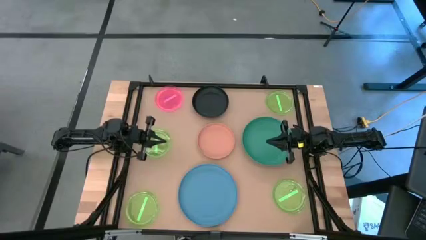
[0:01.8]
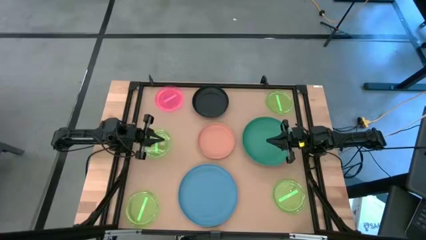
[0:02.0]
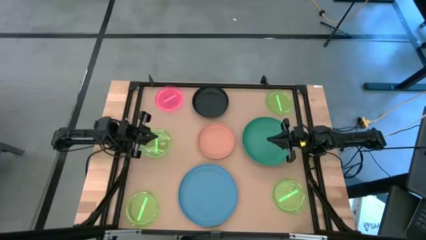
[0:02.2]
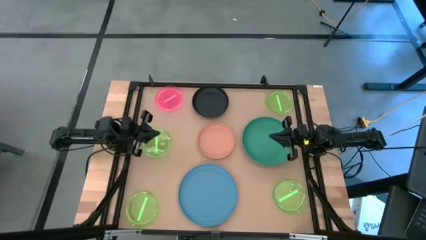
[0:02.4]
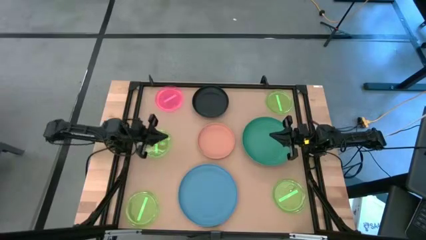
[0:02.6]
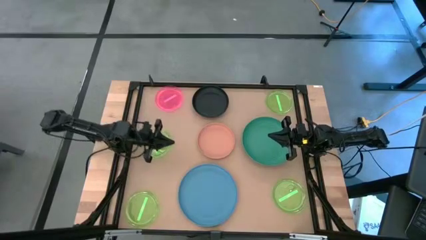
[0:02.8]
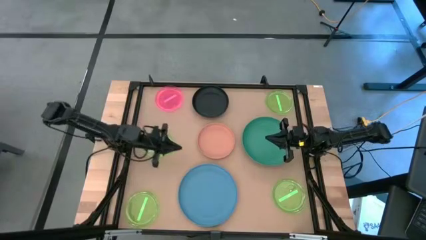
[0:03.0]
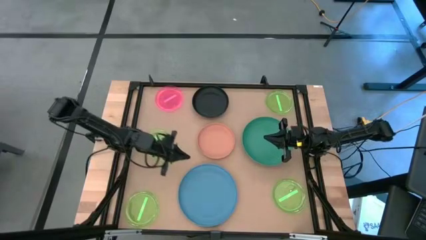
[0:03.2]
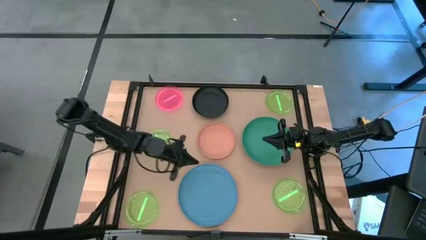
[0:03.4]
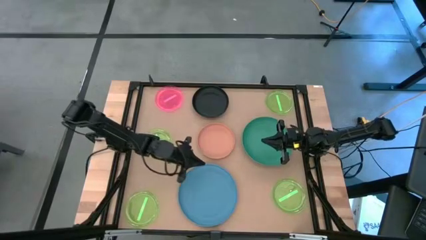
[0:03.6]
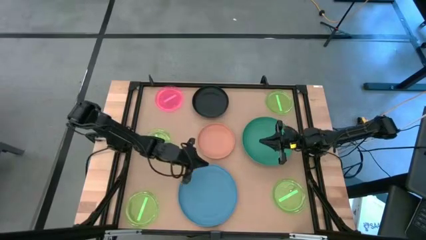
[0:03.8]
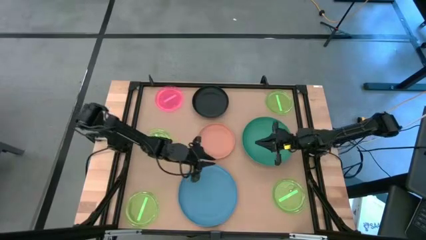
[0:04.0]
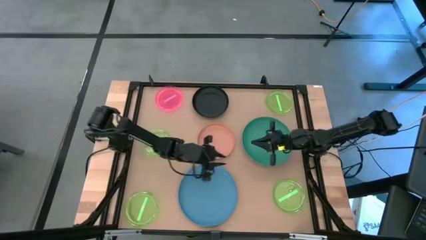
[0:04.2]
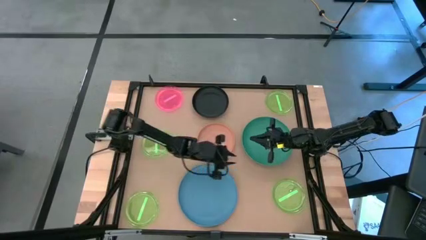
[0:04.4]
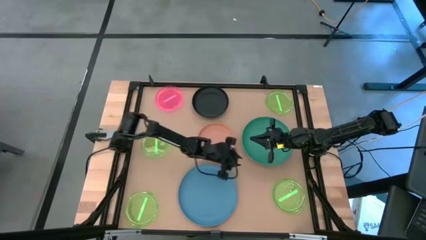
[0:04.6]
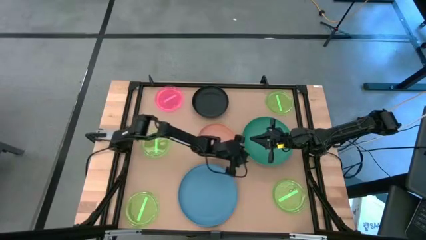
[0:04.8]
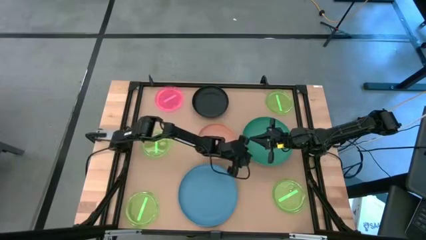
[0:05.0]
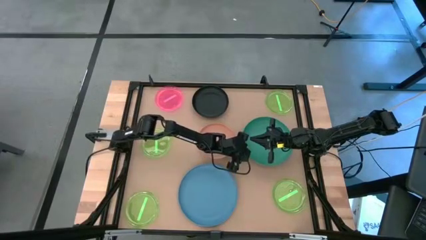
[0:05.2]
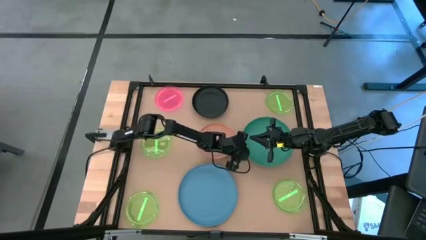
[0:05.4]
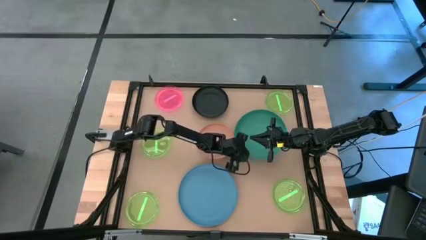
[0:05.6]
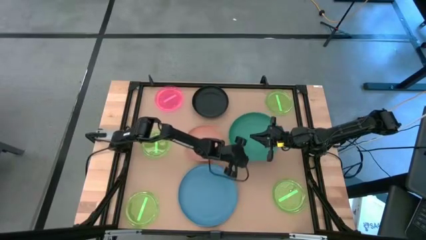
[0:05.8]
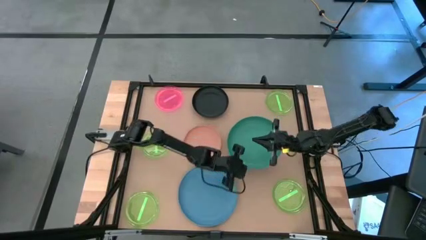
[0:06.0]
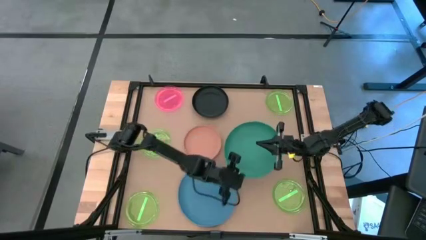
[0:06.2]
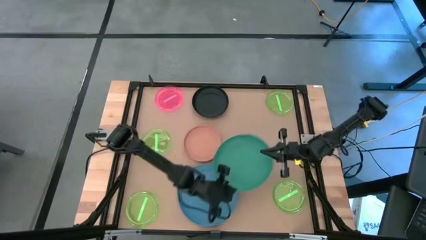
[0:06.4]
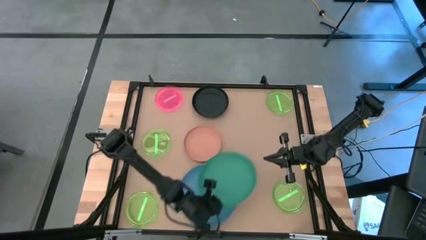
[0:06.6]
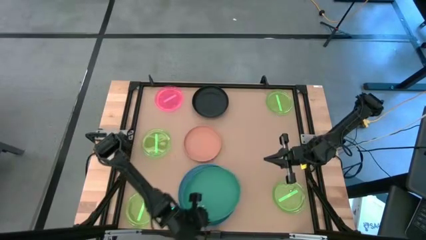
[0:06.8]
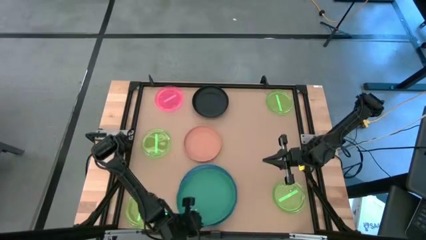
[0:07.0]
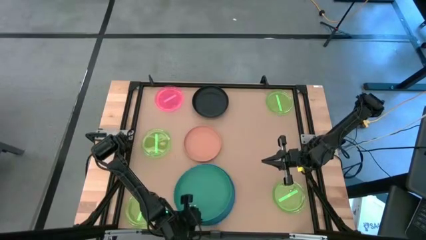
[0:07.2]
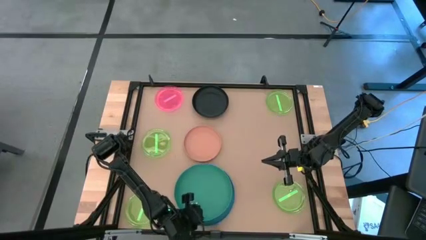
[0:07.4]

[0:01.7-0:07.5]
Task: Stack plastic plates
Stack the dark green plate on top of the blue plate

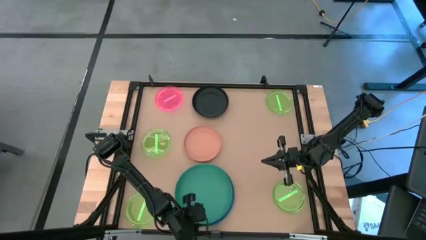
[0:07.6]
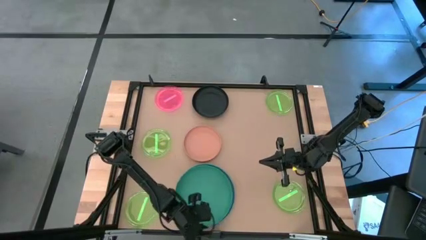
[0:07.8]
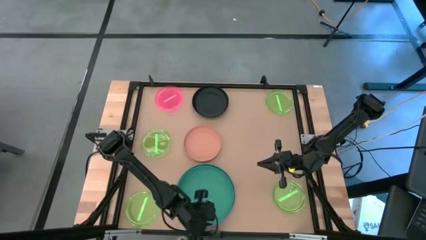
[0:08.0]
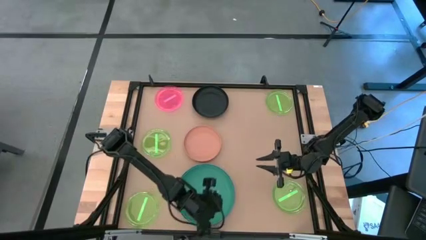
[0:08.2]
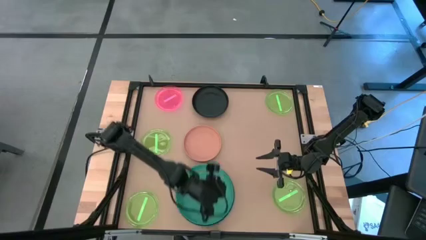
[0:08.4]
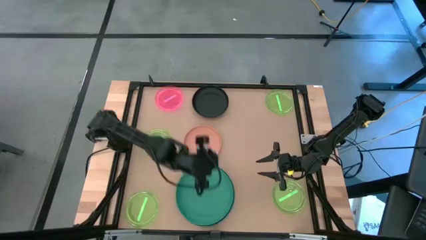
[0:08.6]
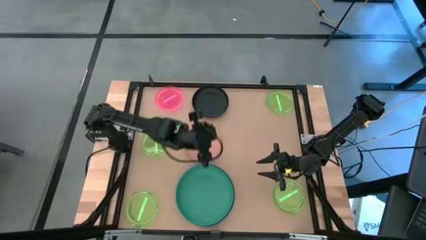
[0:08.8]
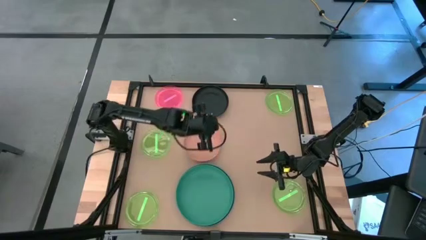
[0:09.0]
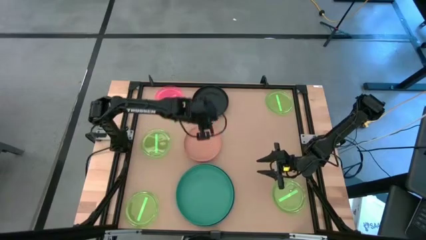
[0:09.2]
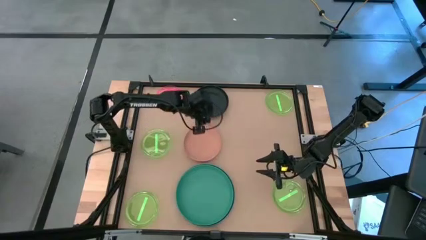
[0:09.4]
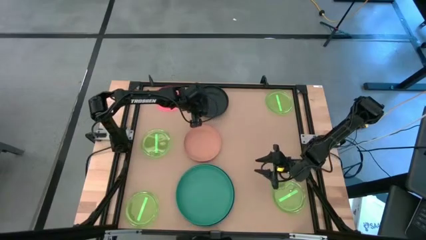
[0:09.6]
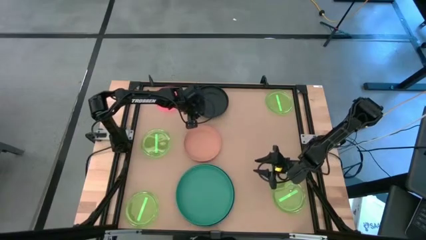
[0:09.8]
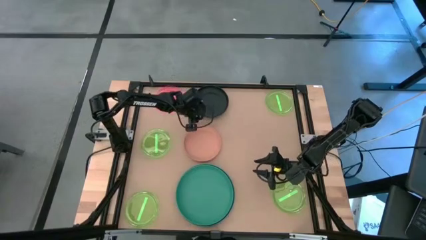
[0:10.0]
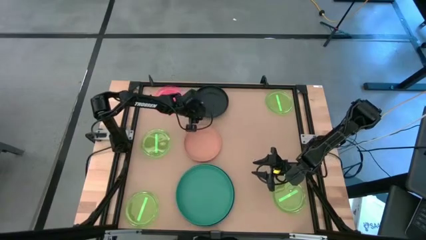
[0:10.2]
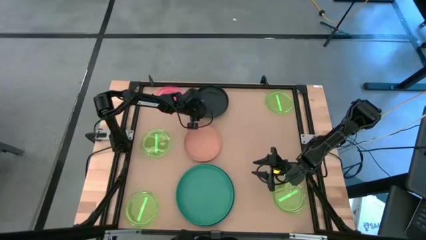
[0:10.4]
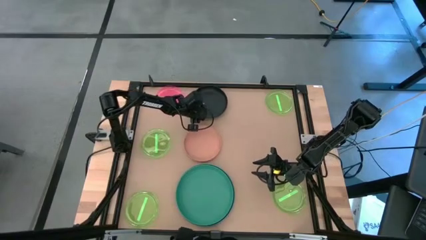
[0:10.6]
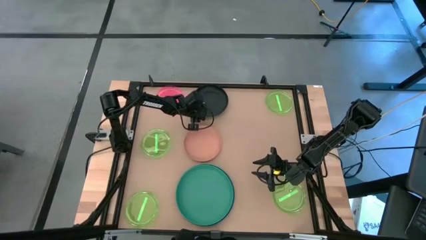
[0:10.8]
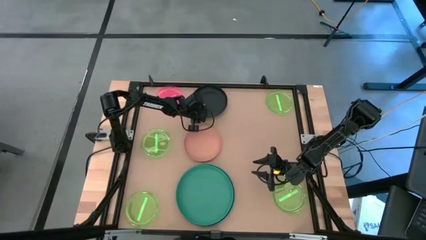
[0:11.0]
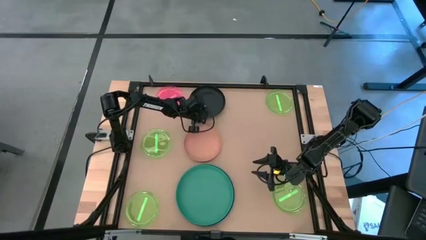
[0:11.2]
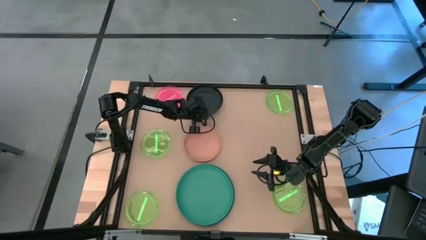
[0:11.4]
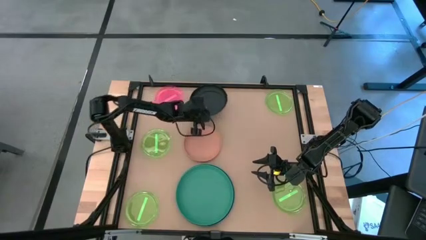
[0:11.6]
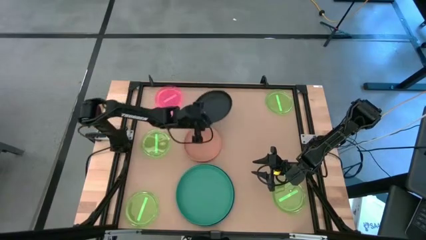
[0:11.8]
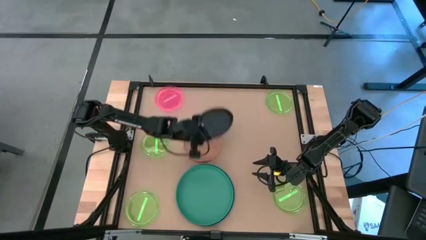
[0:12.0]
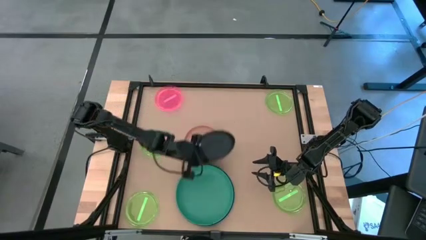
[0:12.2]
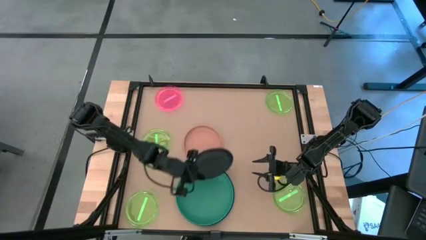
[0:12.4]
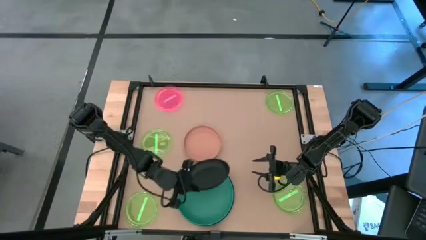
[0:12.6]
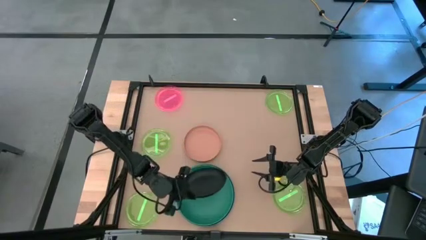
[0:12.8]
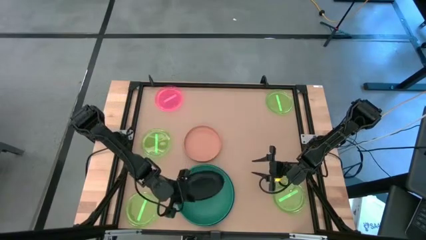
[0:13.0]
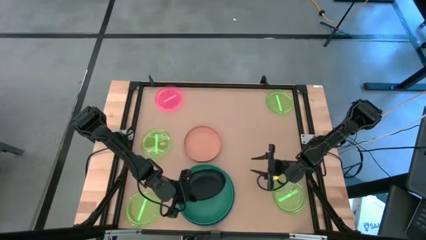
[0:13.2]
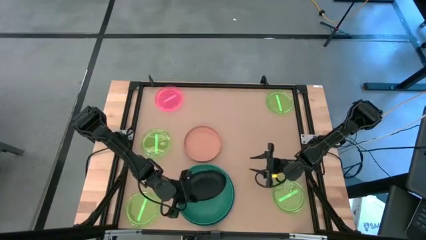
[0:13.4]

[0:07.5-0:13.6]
Stack the black plate on top of the dark green plate

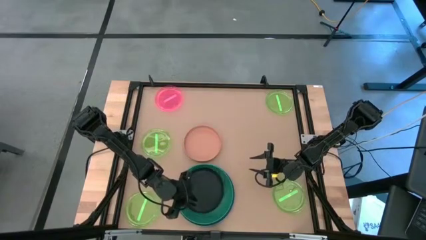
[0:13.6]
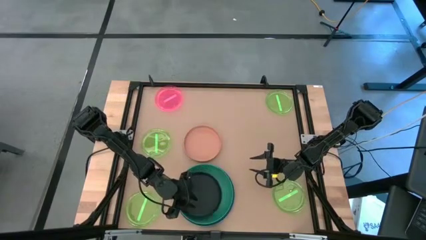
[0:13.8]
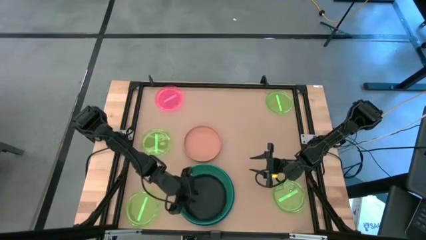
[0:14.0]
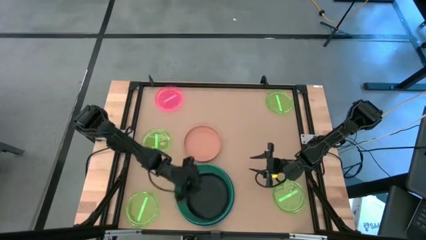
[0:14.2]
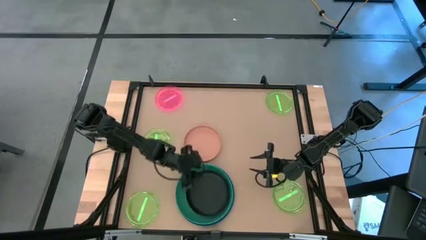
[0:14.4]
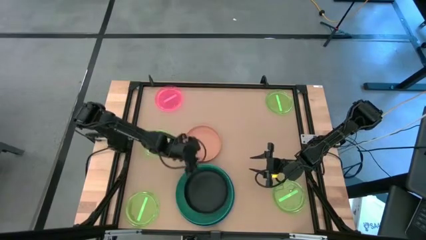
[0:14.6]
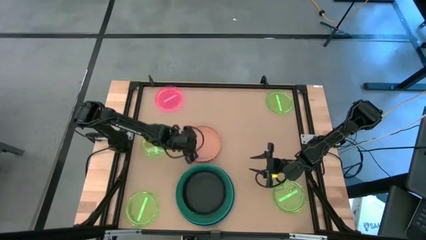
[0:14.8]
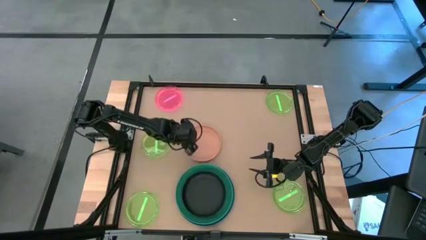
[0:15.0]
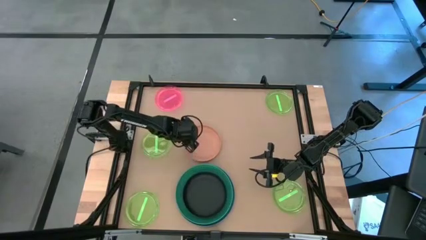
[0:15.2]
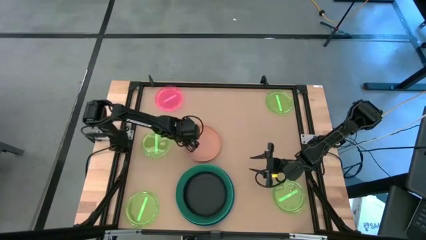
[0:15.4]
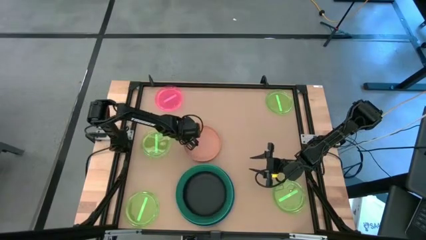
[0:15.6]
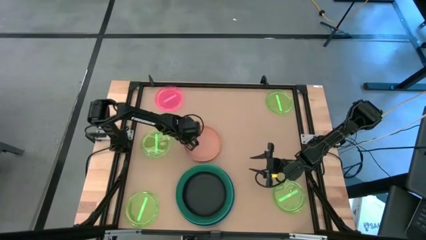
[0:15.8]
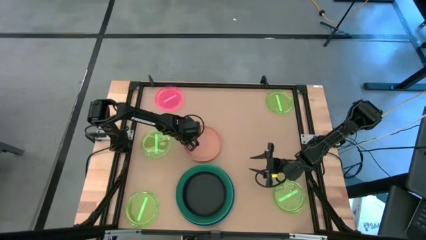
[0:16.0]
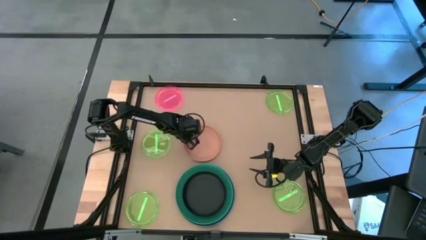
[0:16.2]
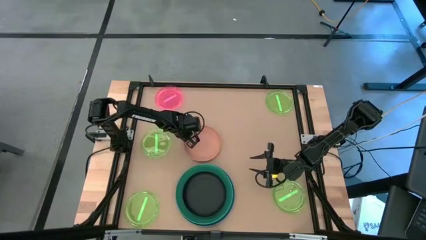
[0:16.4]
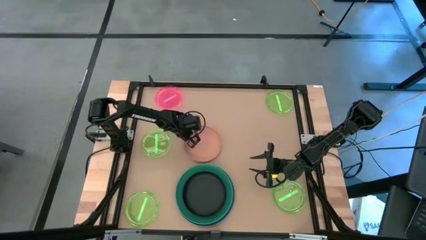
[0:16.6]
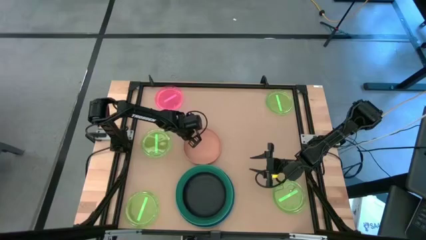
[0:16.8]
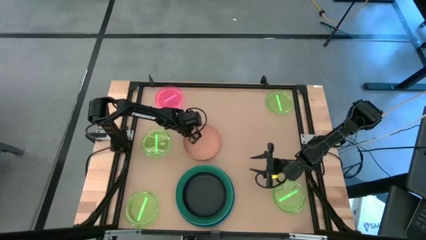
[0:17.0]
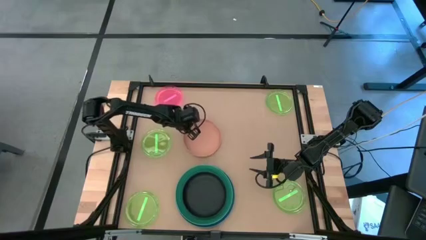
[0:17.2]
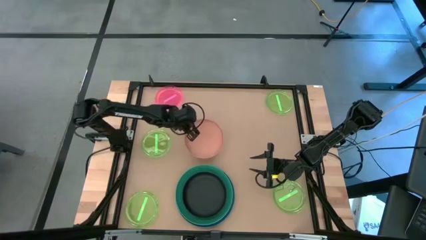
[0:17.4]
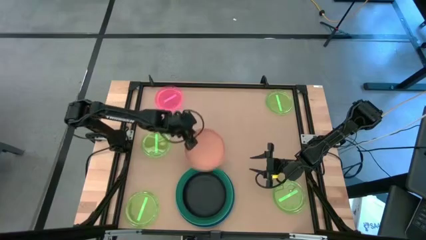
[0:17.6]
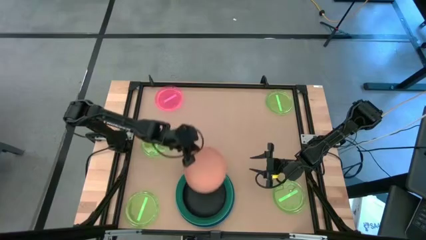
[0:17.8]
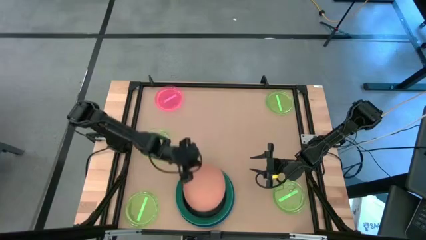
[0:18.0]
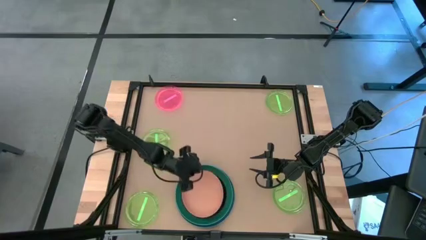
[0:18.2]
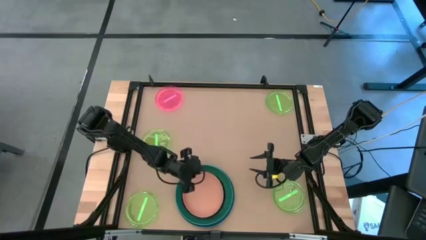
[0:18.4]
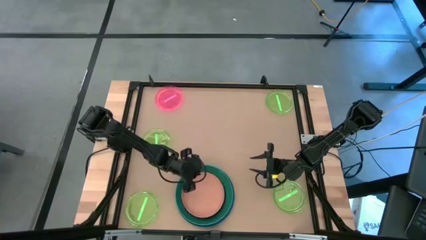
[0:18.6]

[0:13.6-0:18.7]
Stack the orange plate on top of the black plate
